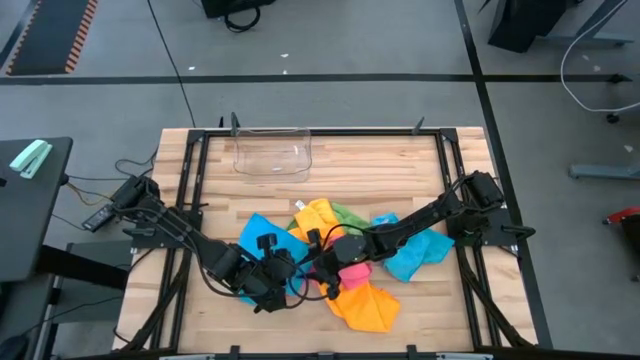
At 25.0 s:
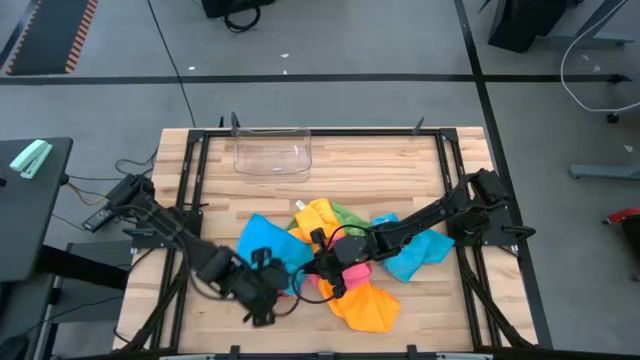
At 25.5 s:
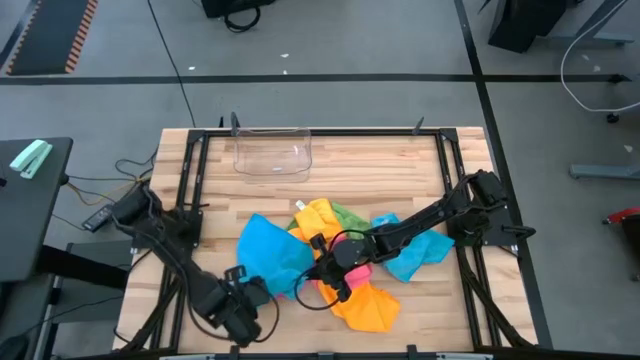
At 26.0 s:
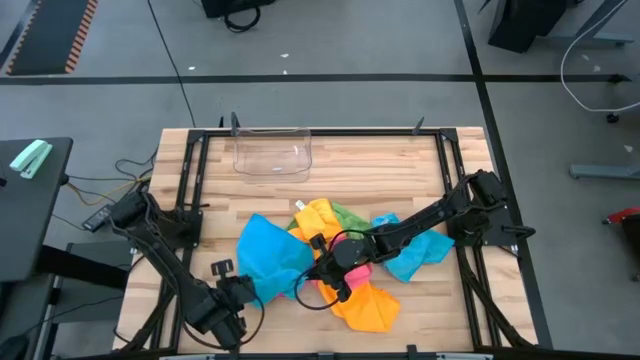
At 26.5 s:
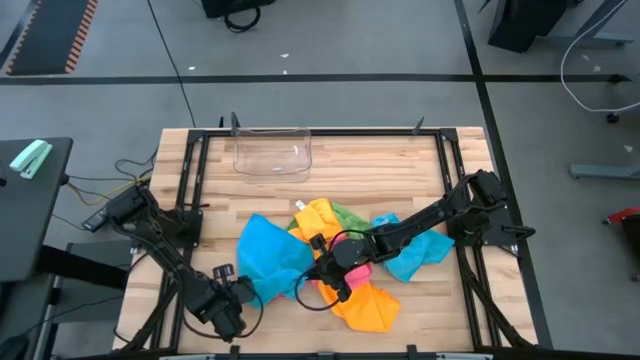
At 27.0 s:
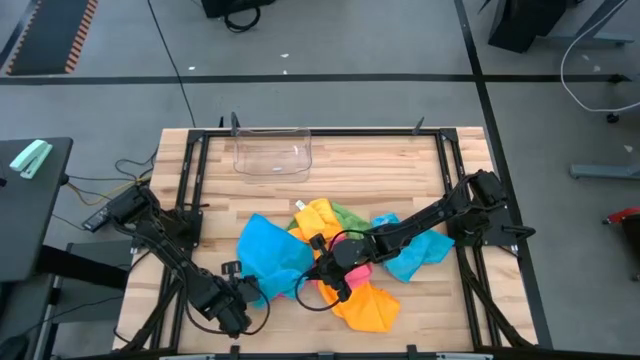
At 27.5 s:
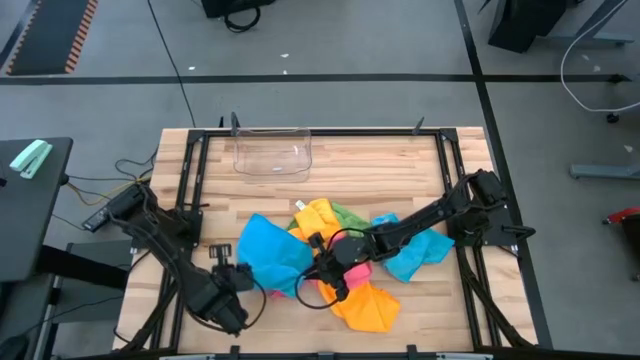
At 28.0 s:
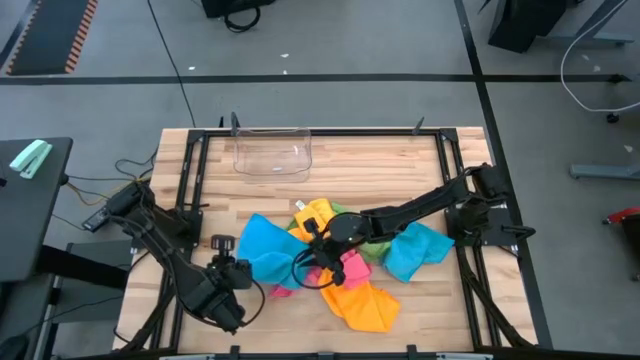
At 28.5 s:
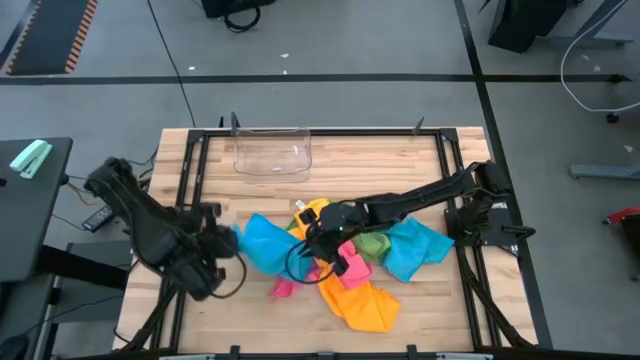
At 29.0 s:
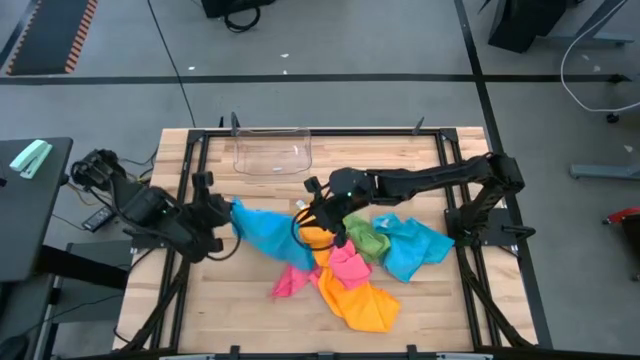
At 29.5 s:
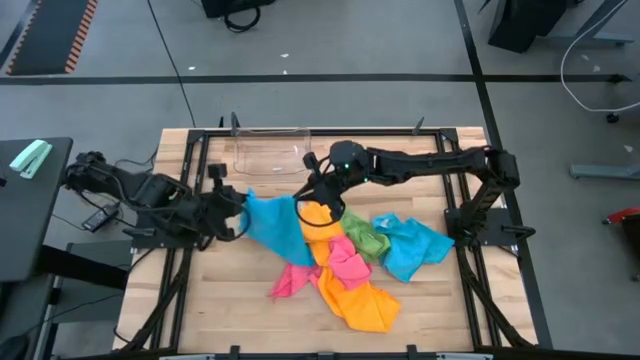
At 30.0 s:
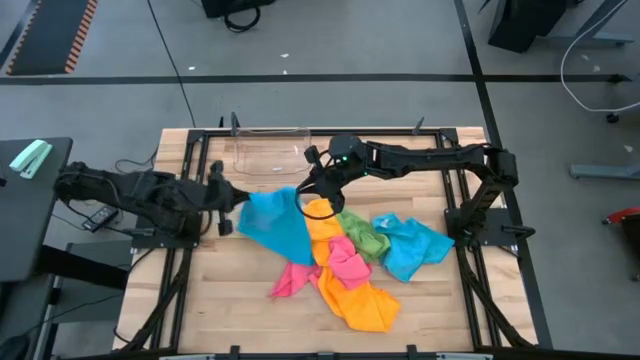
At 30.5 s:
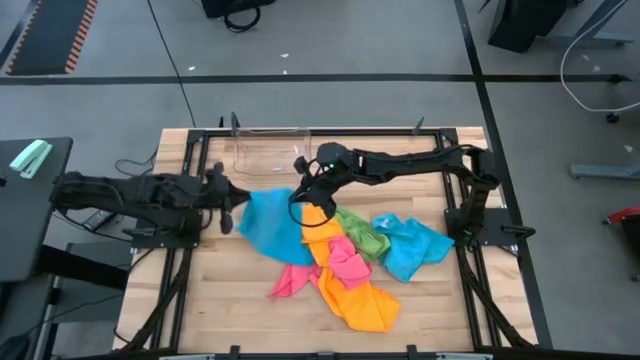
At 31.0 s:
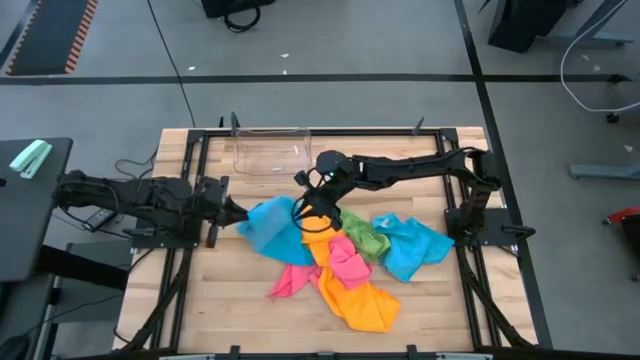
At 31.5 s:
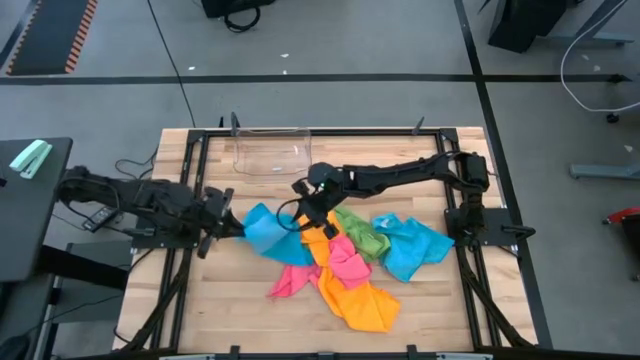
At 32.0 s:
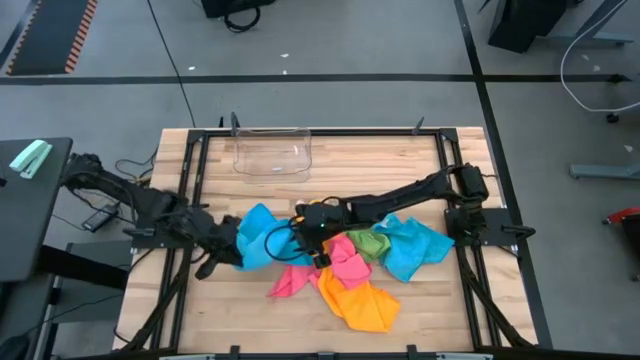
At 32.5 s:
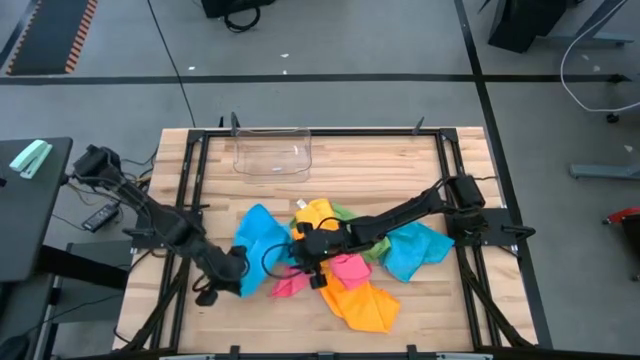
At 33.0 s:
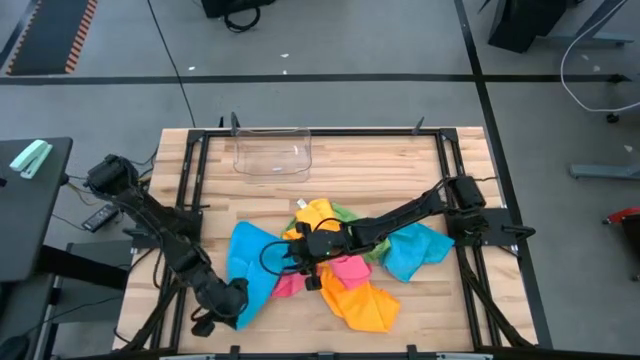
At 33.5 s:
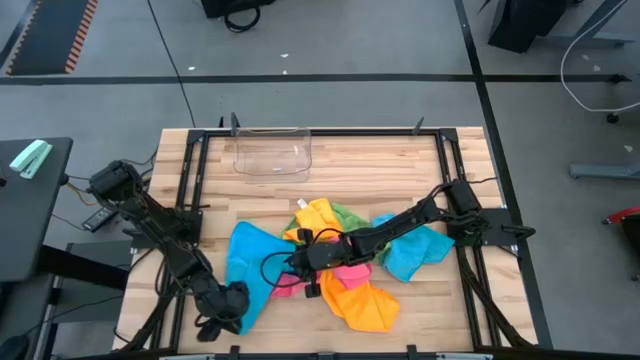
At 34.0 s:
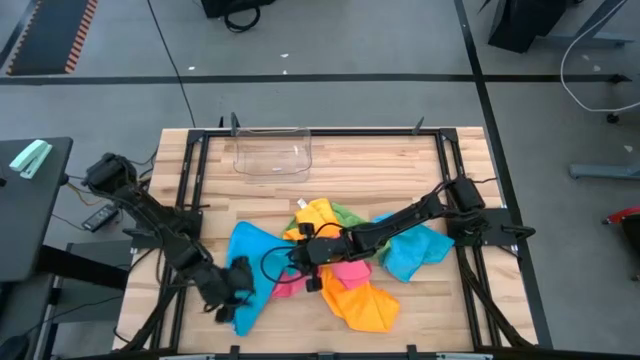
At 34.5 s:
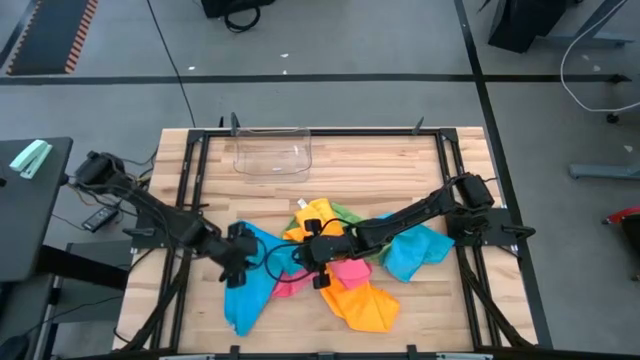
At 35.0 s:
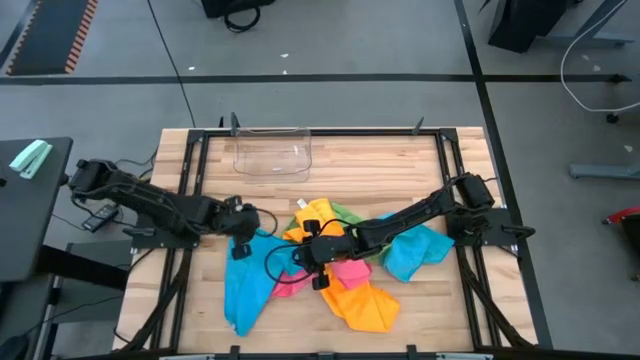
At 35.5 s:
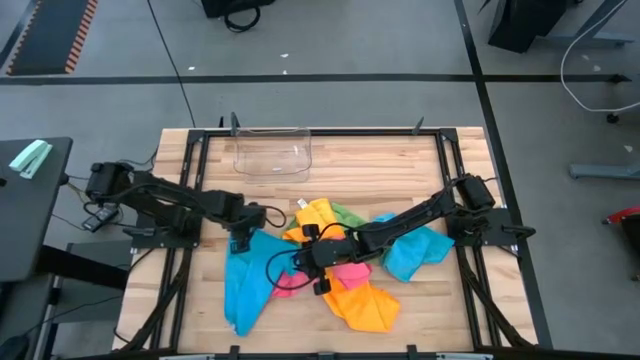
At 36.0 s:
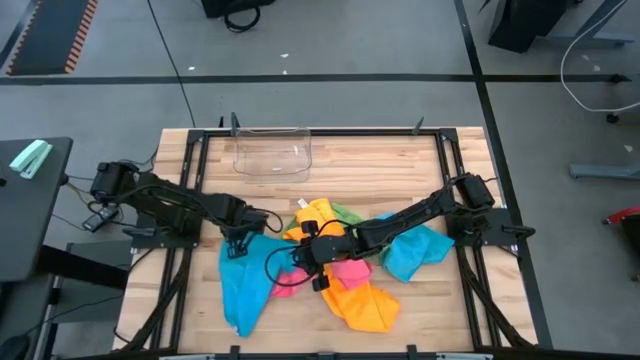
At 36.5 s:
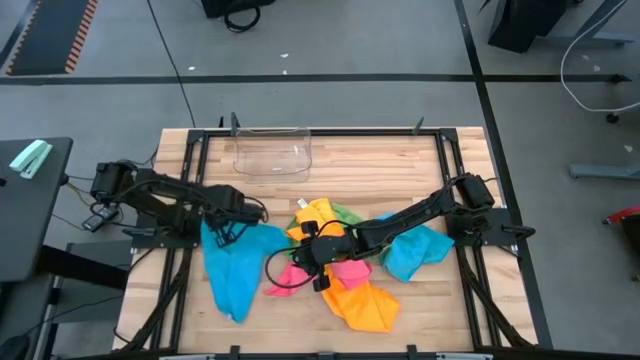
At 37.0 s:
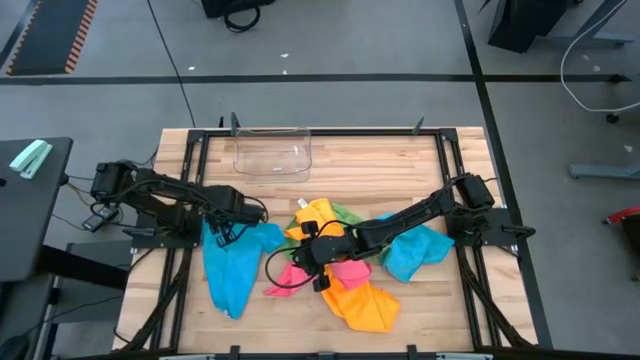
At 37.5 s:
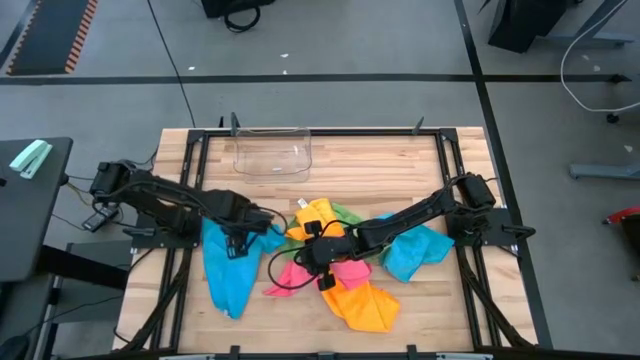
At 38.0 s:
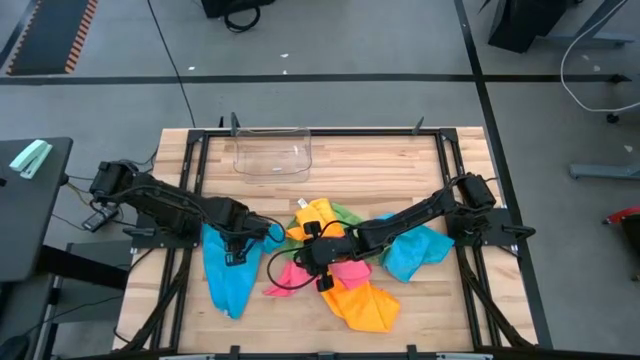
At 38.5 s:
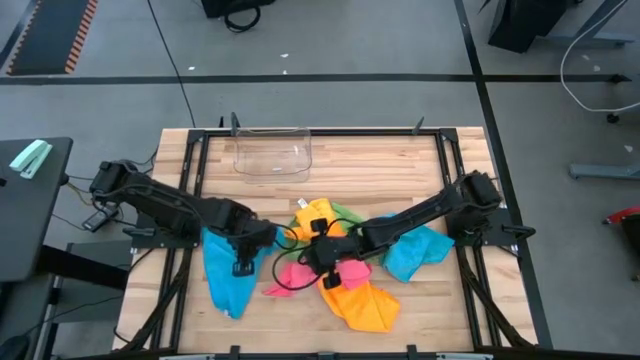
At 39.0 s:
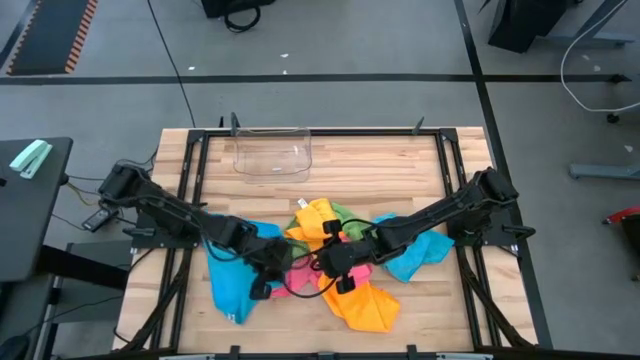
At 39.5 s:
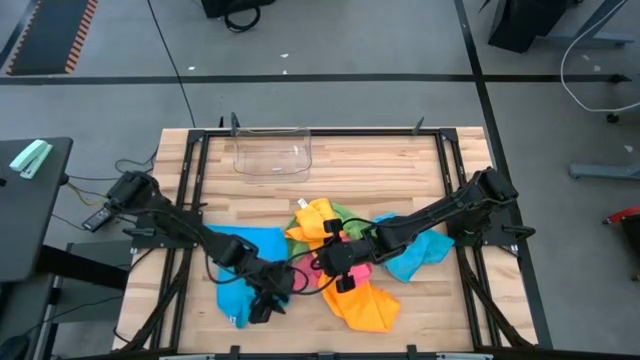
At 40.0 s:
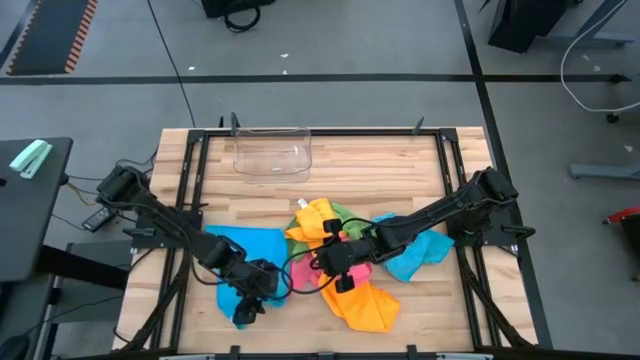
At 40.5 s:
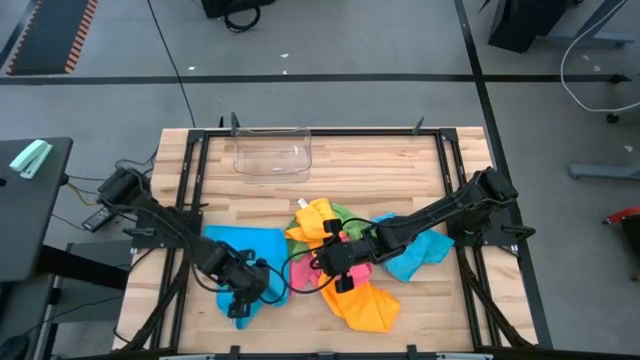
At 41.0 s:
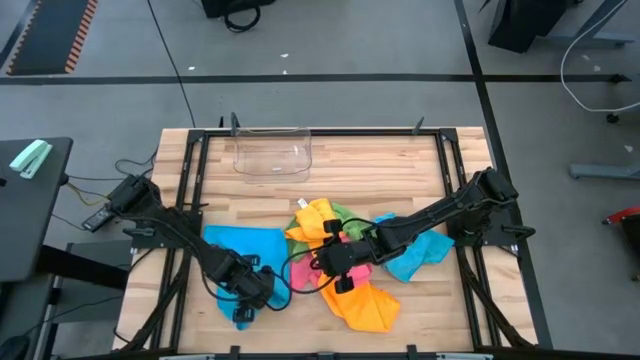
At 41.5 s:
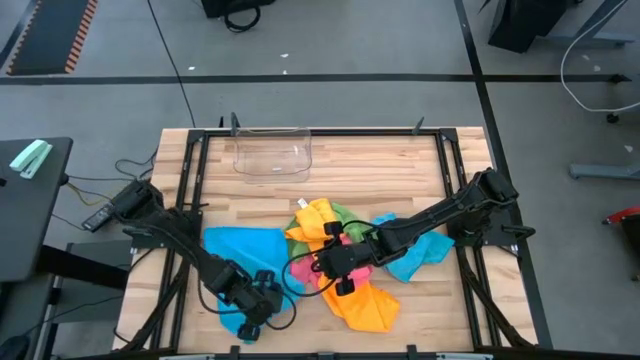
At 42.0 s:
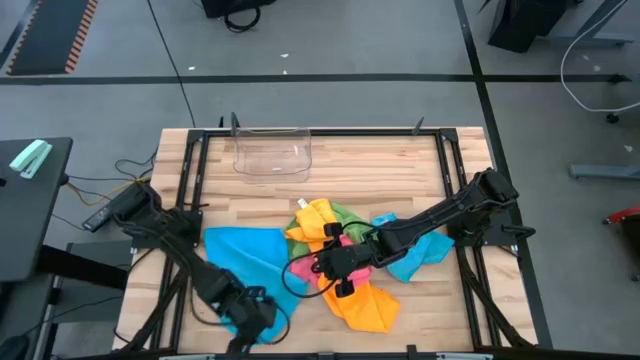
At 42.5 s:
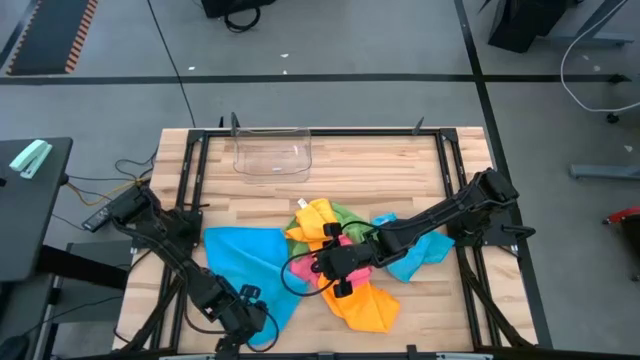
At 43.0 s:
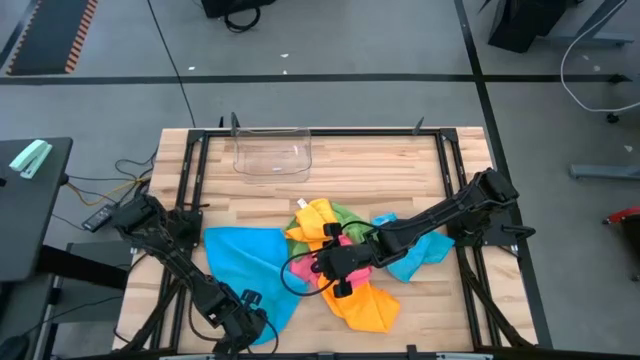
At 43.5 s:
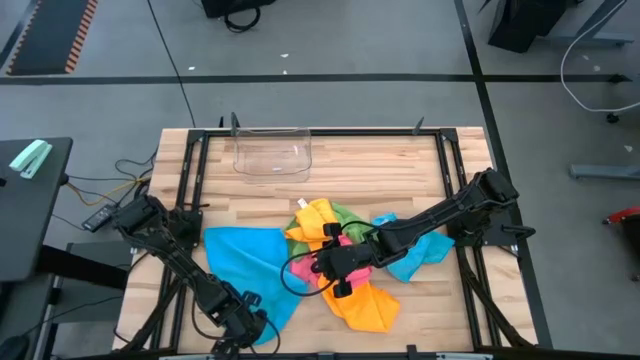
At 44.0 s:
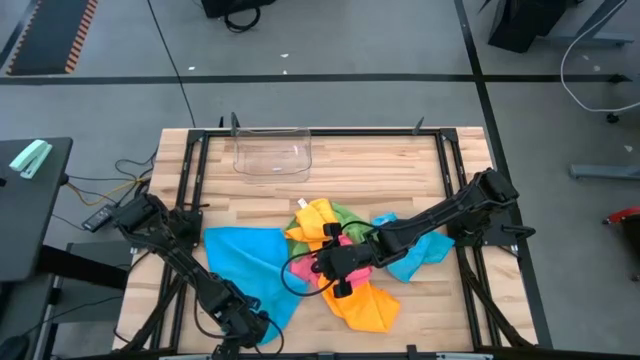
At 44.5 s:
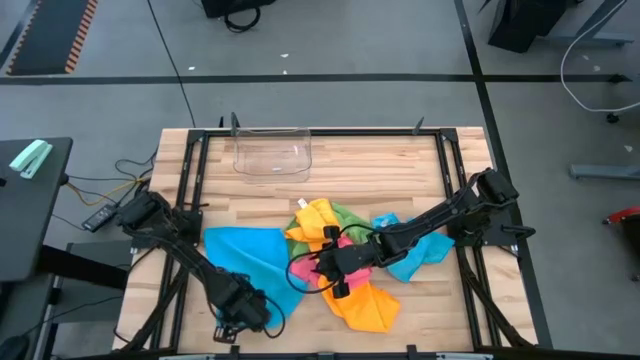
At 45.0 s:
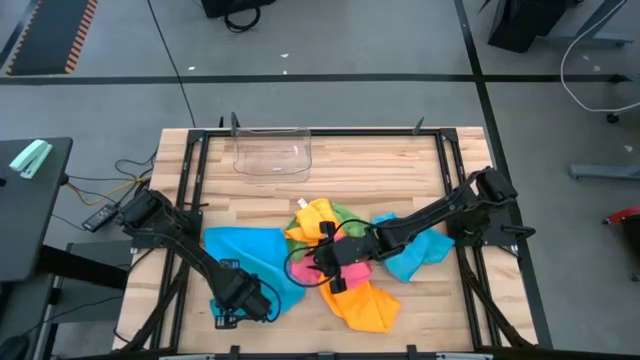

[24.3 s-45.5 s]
Task: Fold microfiber towels
Fold the left blue microfiber towel
